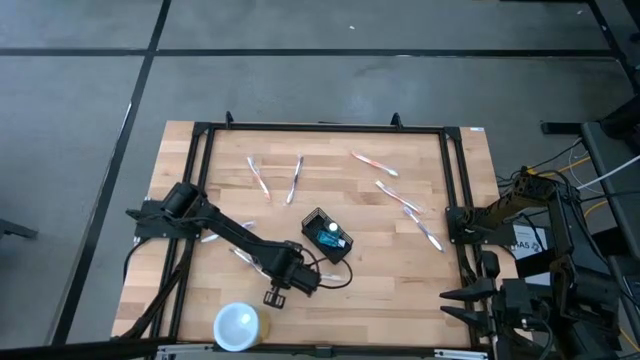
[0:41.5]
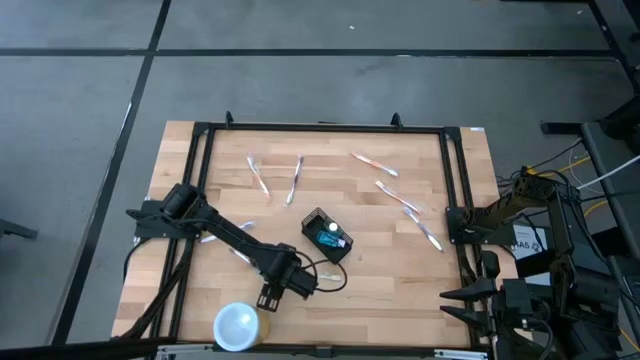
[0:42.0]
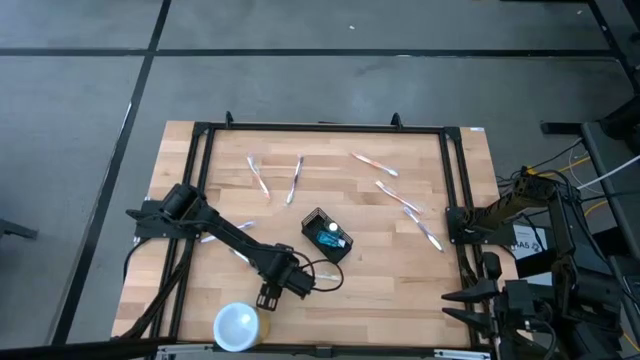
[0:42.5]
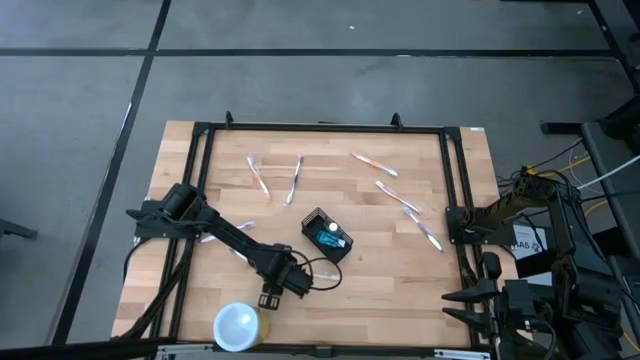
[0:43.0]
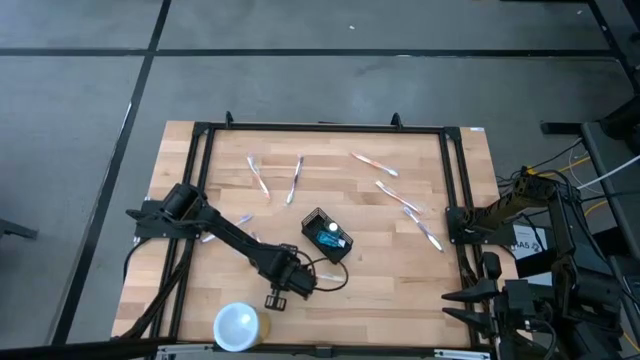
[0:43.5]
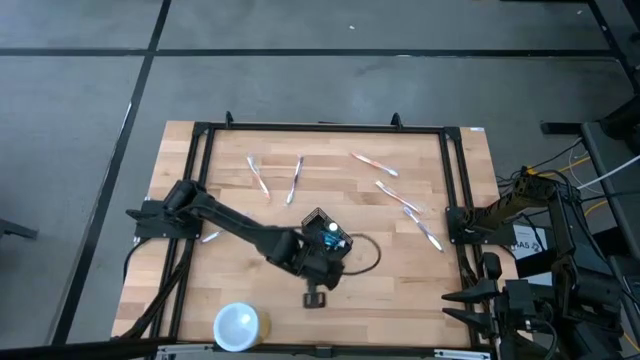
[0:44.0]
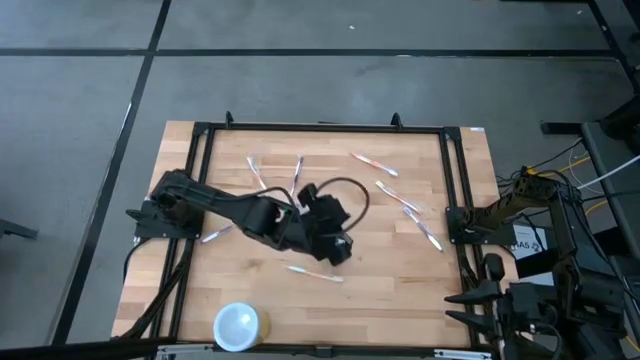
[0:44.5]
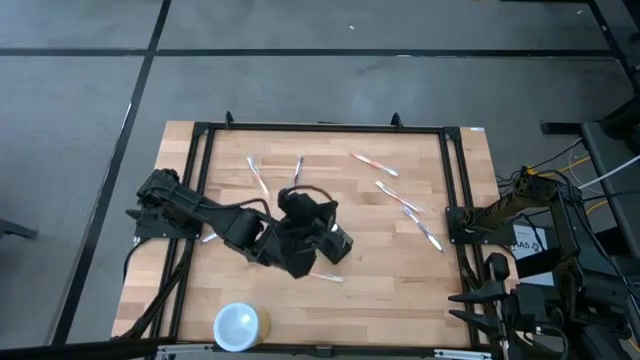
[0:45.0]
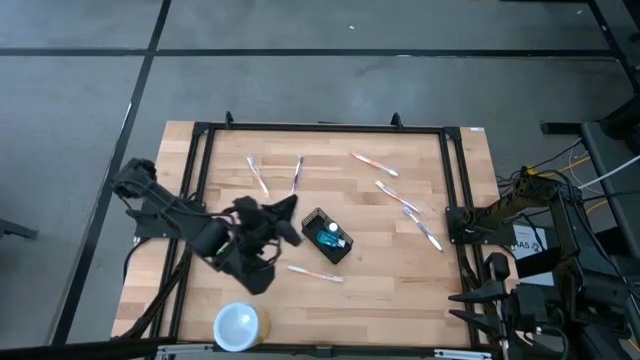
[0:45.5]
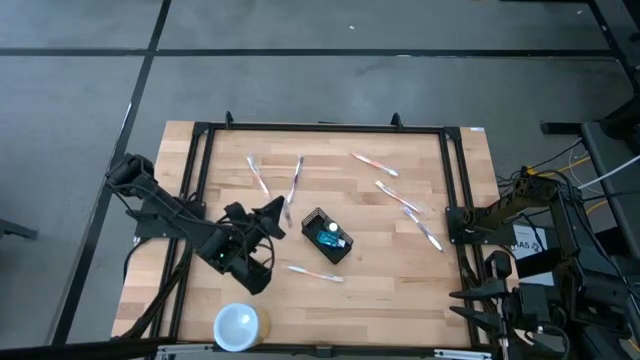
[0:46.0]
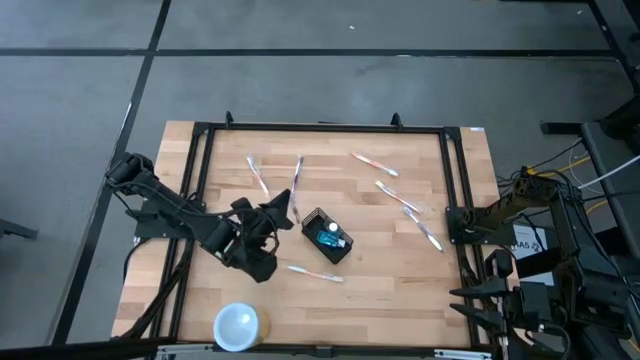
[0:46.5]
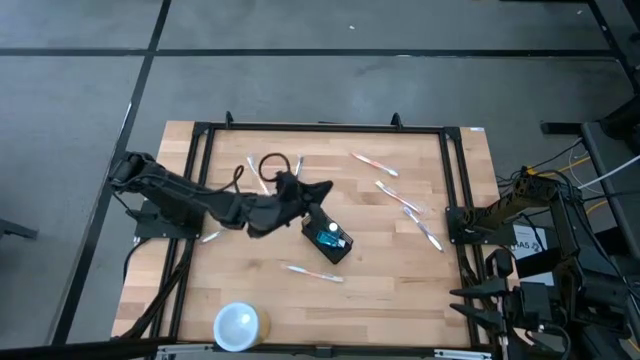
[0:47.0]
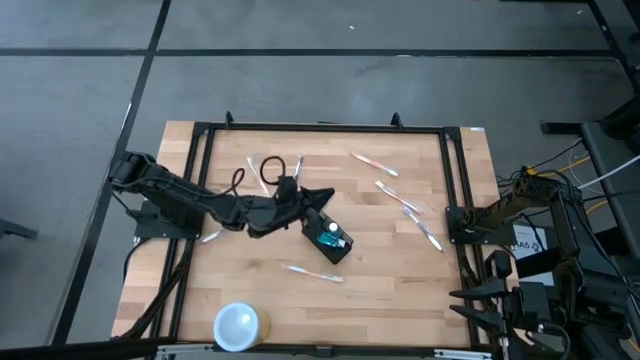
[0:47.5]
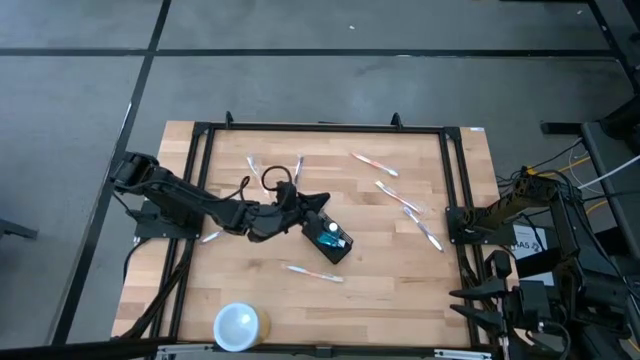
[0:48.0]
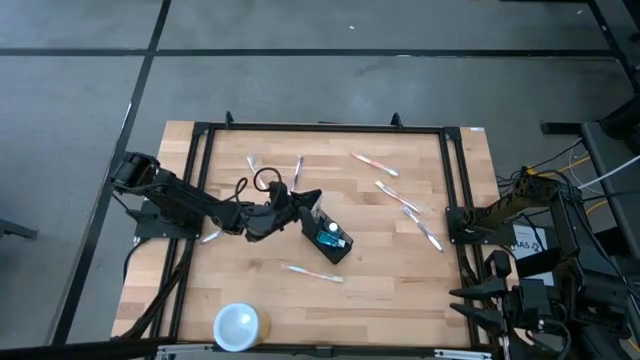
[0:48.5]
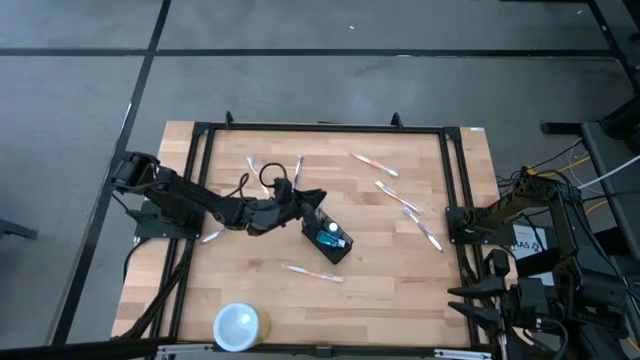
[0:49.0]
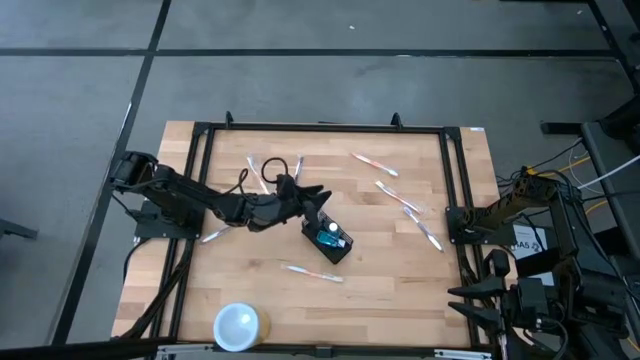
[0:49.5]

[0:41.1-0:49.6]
Task: Pick & Place toothbrushing station
Put the violet toothbrush into the wire organizer

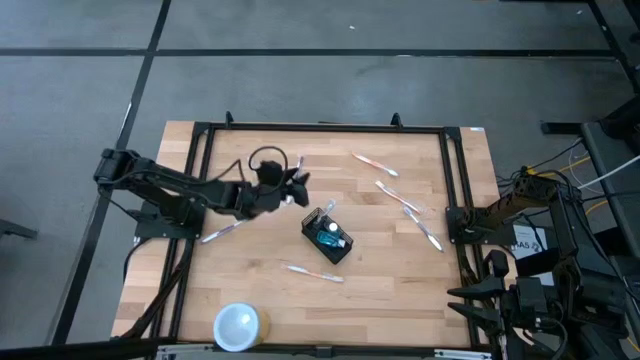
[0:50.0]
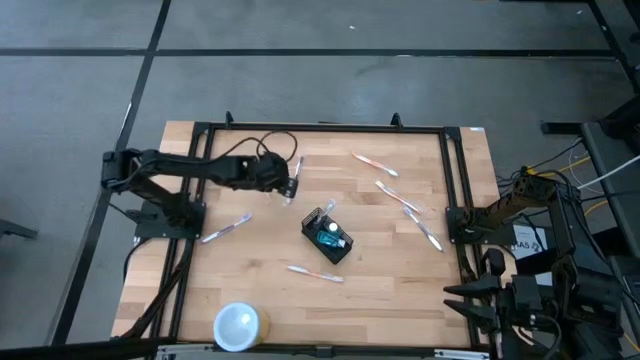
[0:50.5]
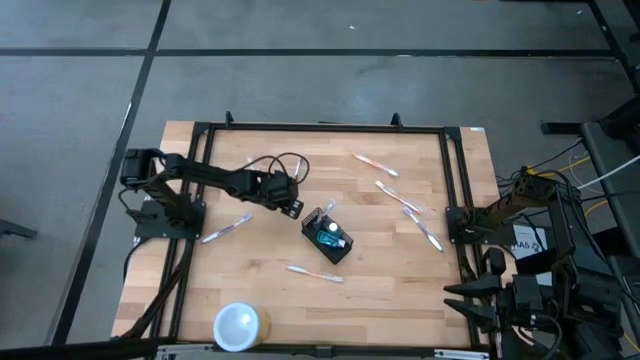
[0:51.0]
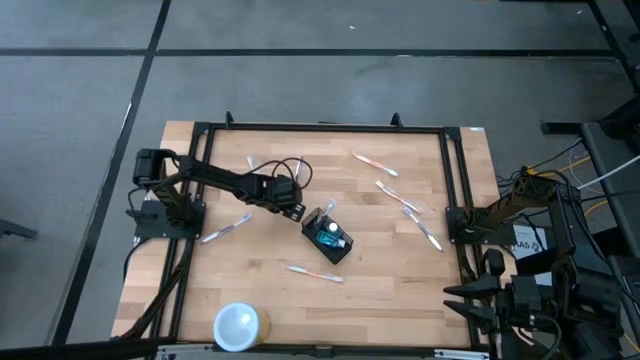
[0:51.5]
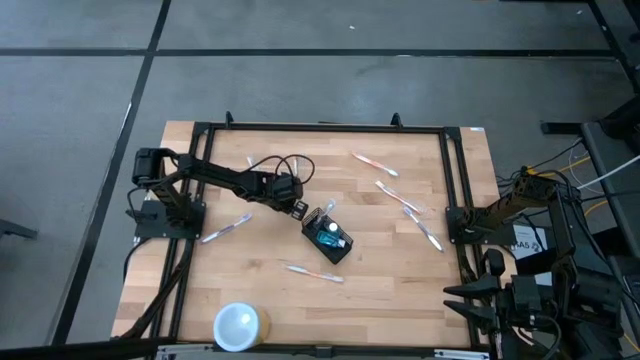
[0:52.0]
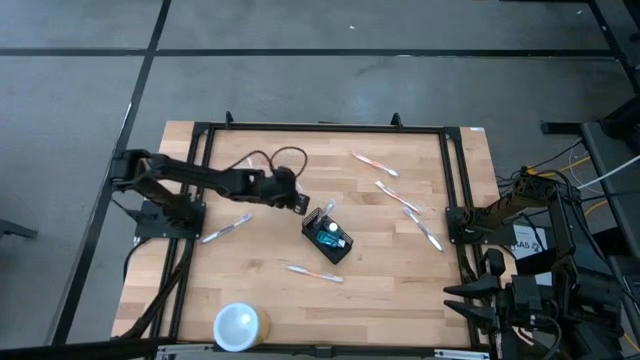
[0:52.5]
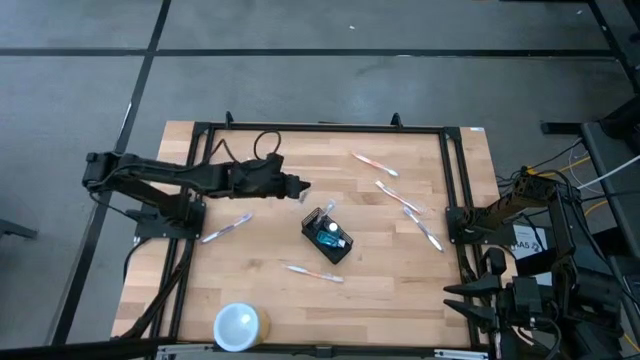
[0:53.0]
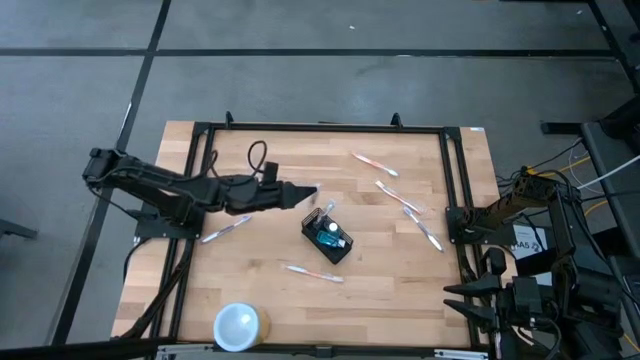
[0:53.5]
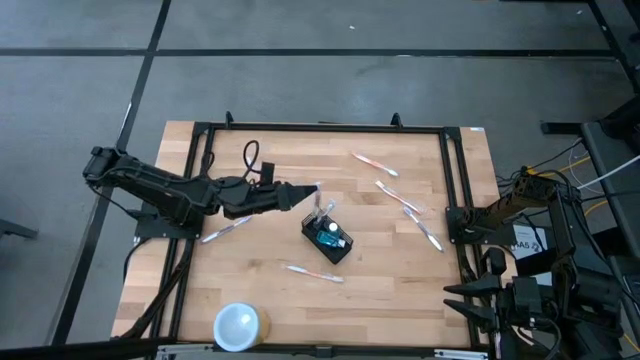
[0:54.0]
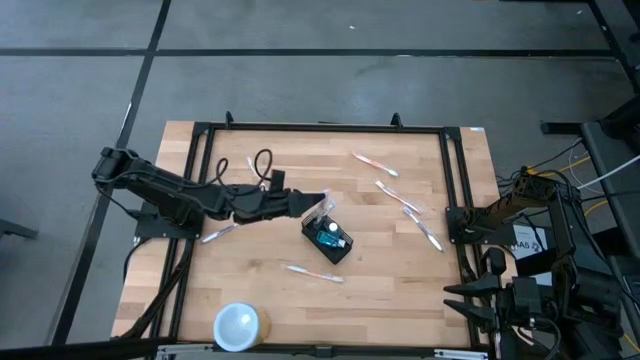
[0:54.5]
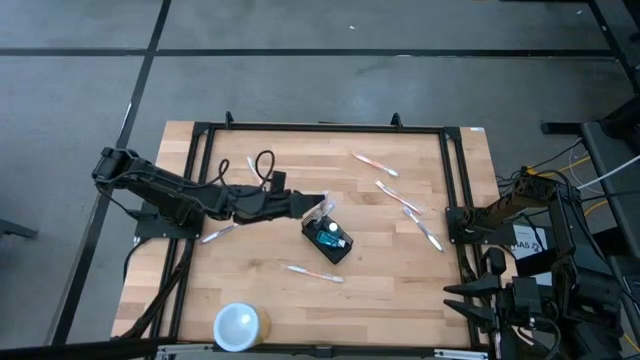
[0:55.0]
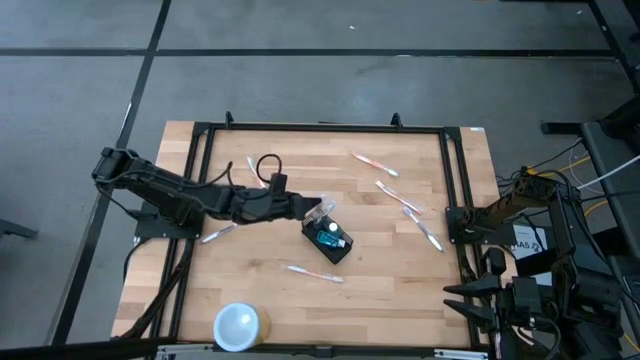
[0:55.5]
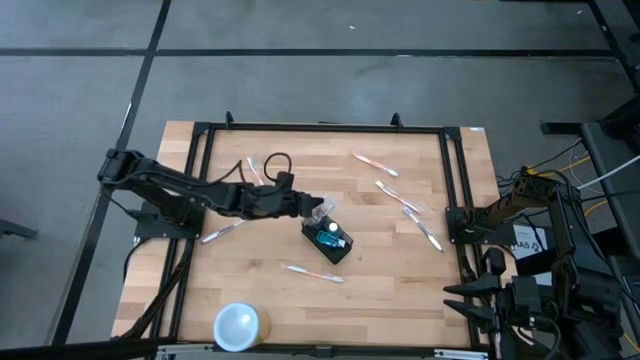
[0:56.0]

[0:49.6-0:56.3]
Put the violet toothbrush into the wire organizer

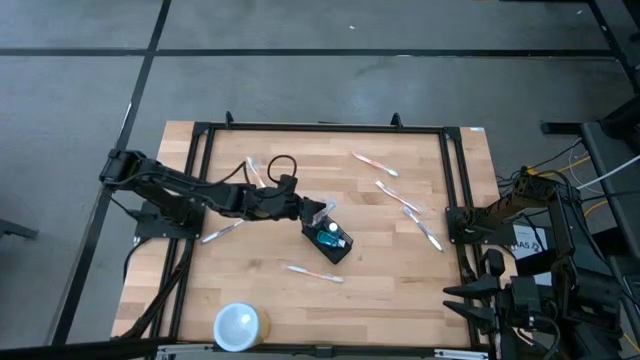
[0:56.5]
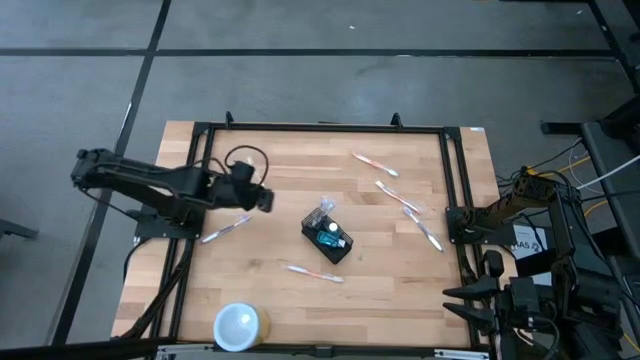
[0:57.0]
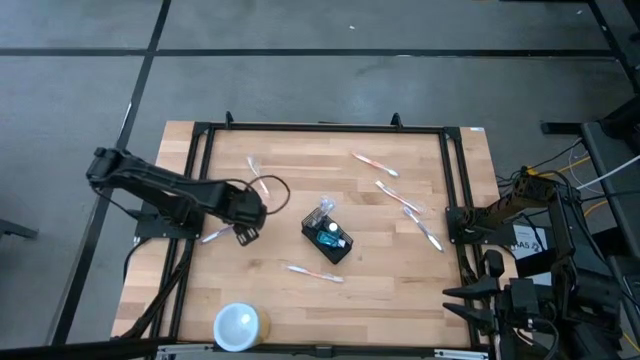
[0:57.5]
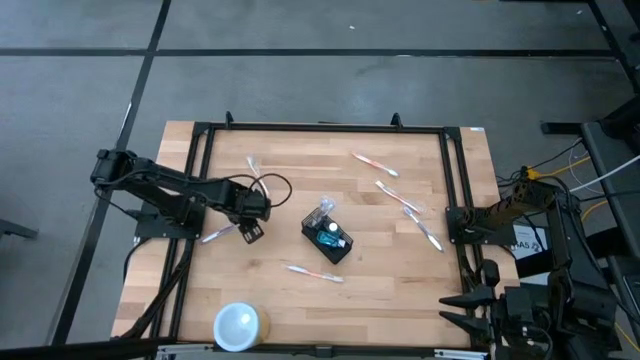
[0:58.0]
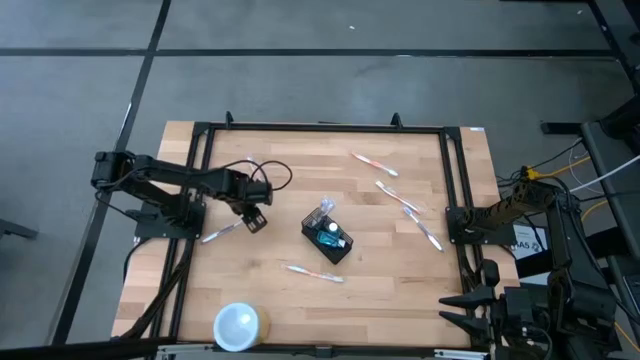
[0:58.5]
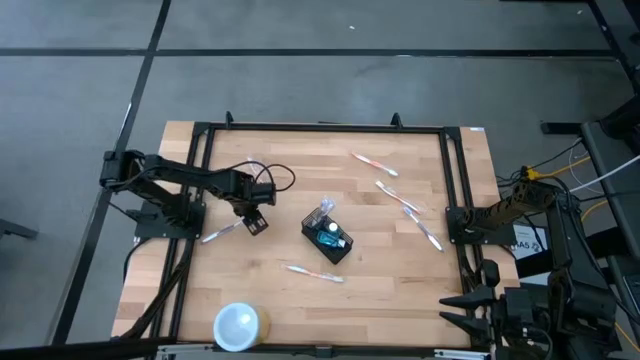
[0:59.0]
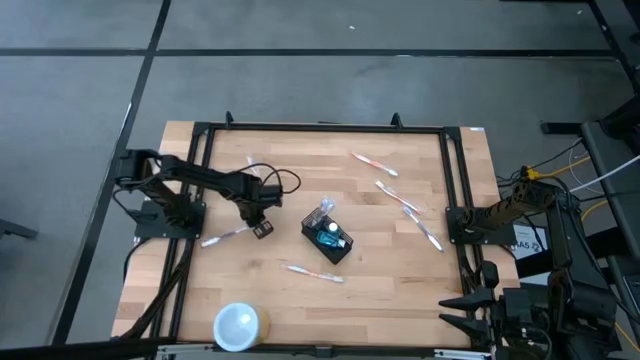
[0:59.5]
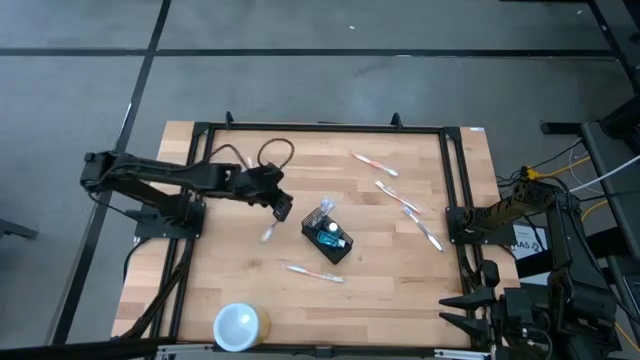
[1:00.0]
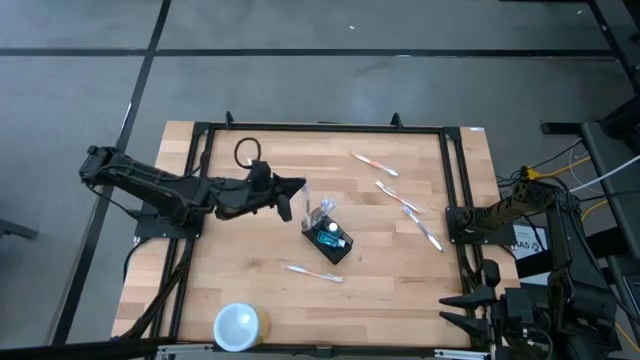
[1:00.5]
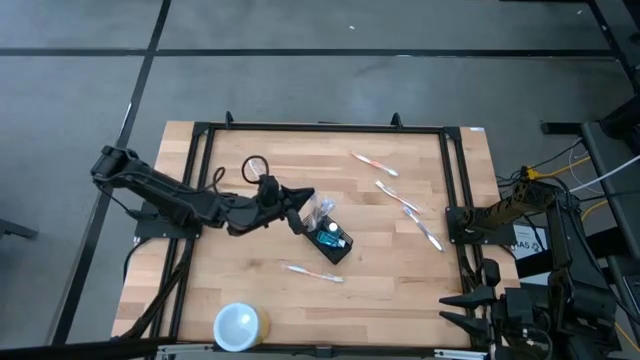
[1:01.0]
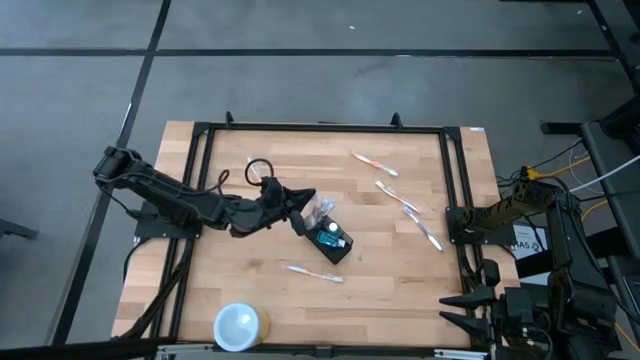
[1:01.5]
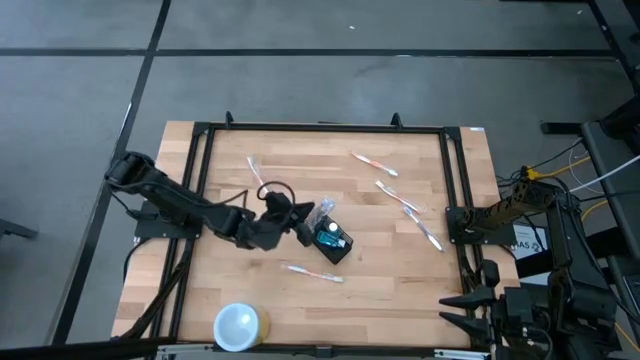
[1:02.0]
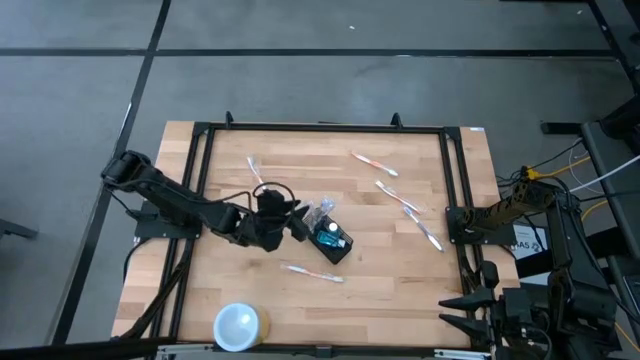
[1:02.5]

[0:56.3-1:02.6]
Put the violet toothbrush into the wire organizer

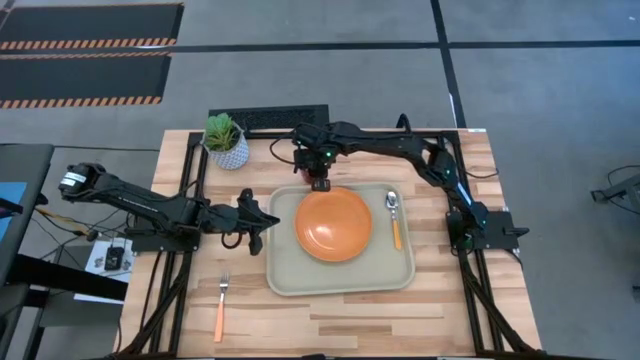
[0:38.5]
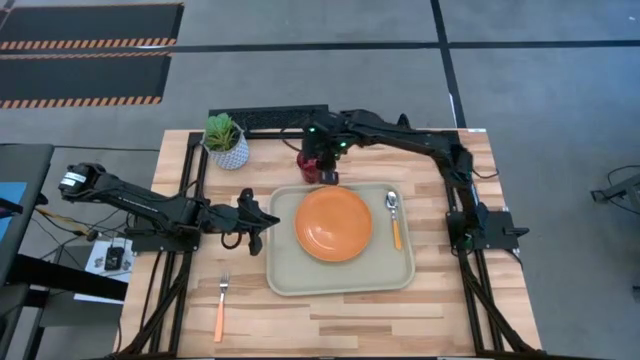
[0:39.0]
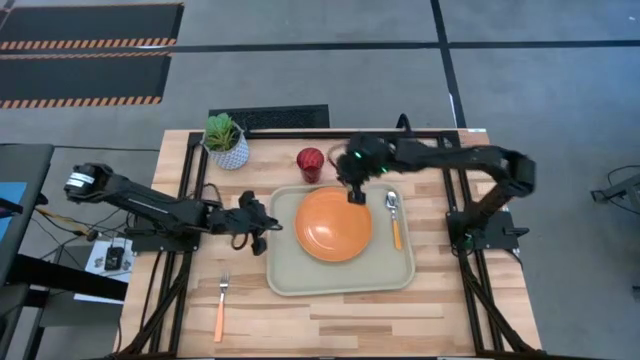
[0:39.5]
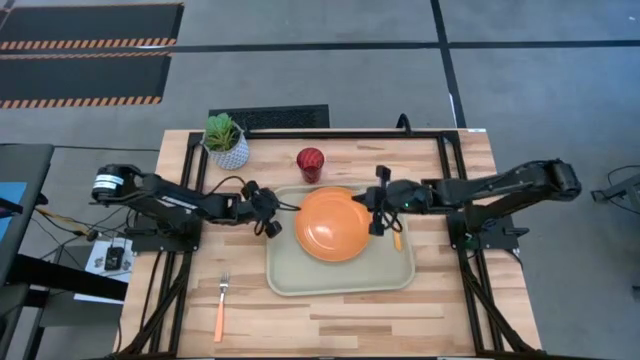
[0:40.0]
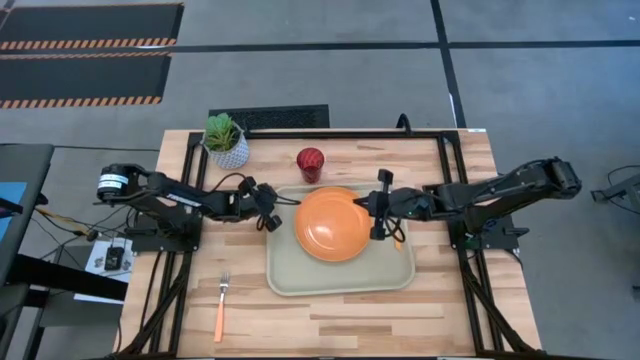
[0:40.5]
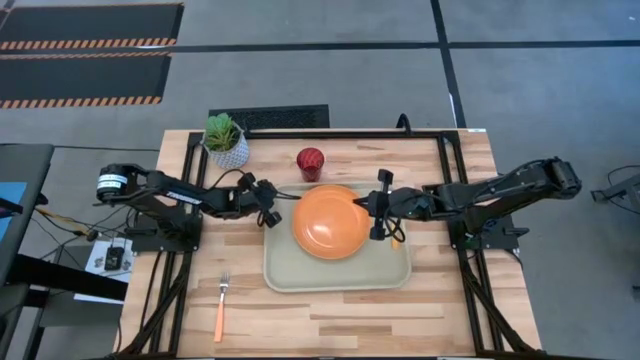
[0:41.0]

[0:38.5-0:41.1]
Task: Pick and place plate/cup/fork/spoon on tray
Adjust the gray serving tray
